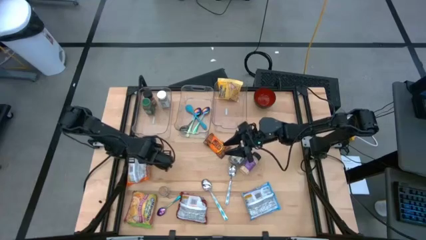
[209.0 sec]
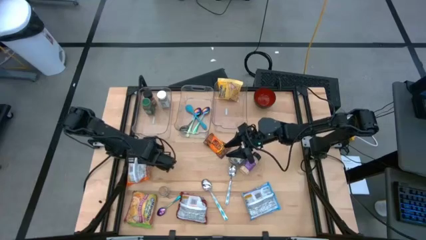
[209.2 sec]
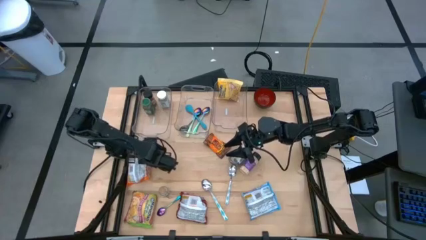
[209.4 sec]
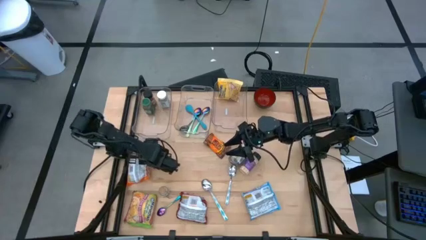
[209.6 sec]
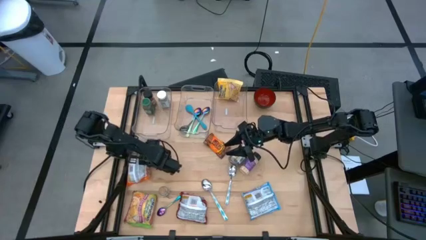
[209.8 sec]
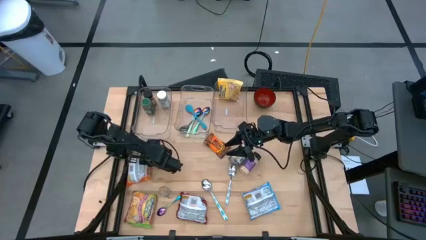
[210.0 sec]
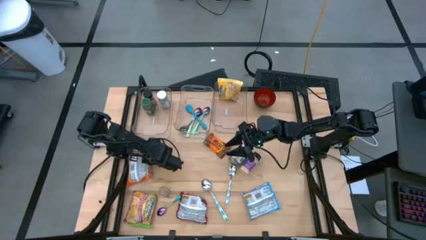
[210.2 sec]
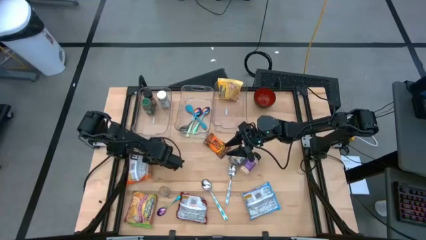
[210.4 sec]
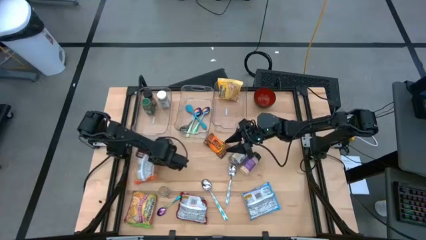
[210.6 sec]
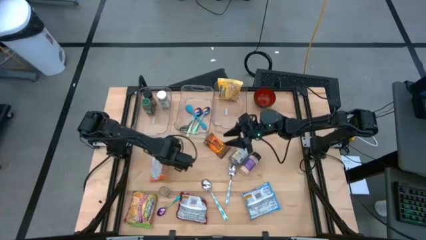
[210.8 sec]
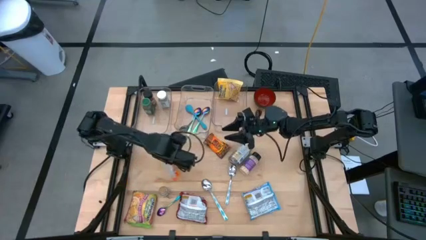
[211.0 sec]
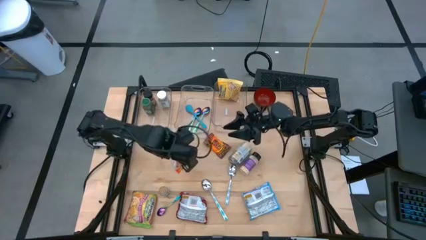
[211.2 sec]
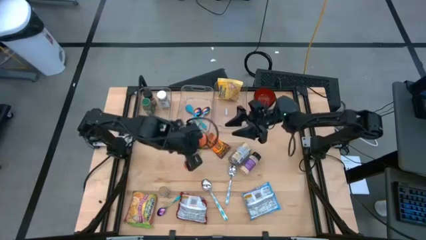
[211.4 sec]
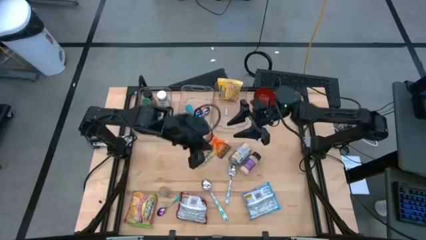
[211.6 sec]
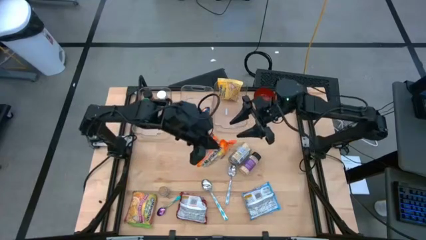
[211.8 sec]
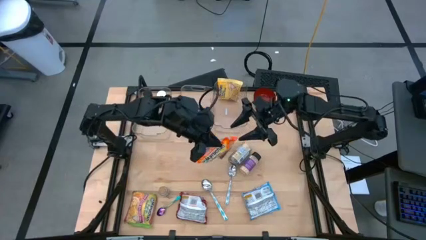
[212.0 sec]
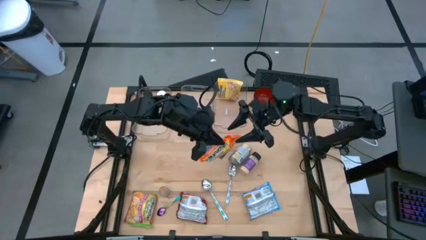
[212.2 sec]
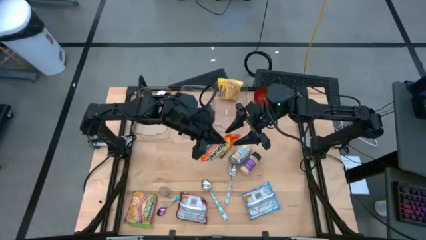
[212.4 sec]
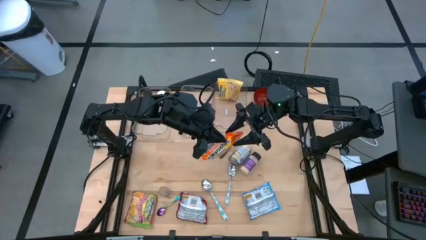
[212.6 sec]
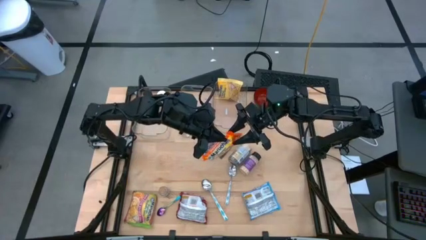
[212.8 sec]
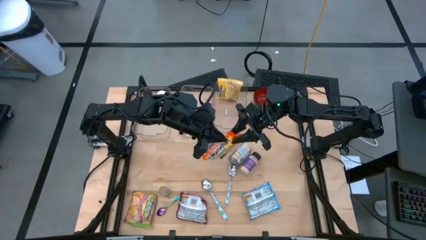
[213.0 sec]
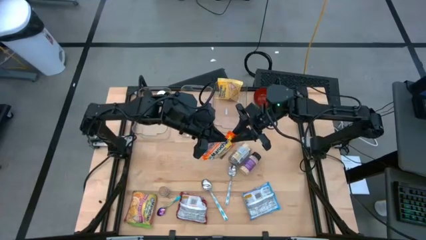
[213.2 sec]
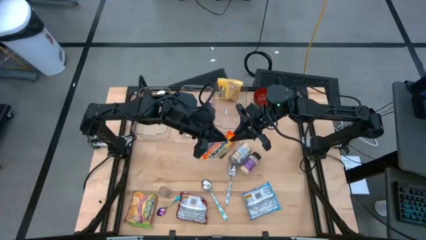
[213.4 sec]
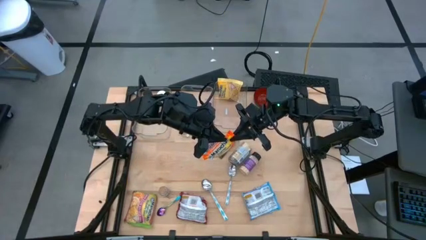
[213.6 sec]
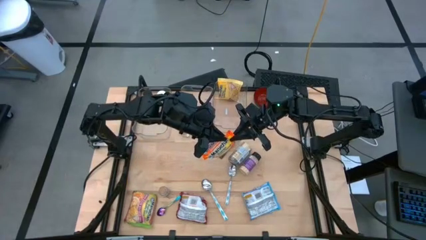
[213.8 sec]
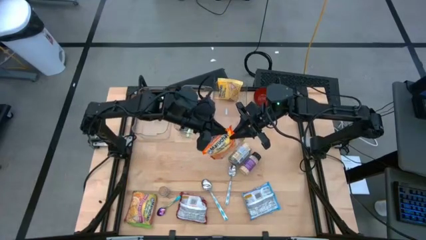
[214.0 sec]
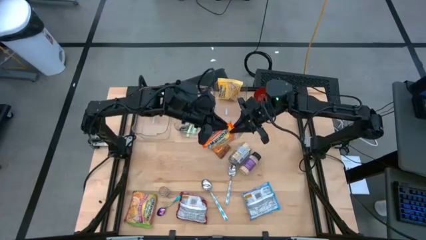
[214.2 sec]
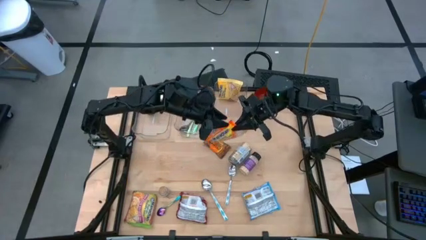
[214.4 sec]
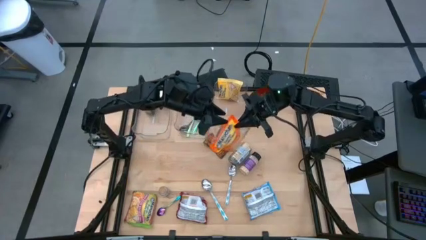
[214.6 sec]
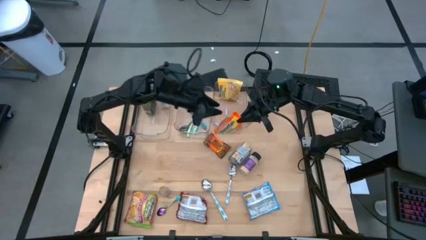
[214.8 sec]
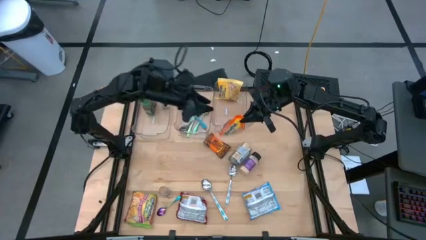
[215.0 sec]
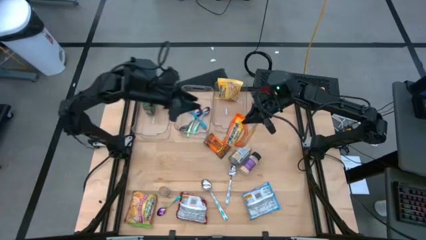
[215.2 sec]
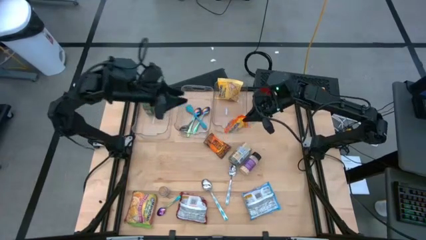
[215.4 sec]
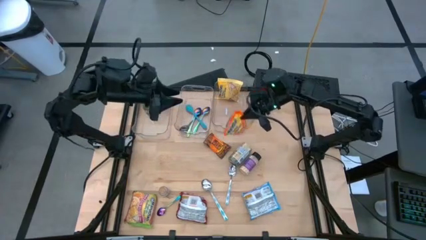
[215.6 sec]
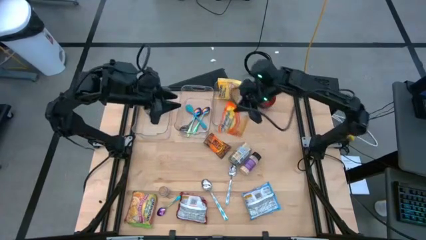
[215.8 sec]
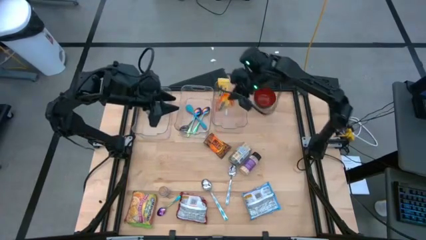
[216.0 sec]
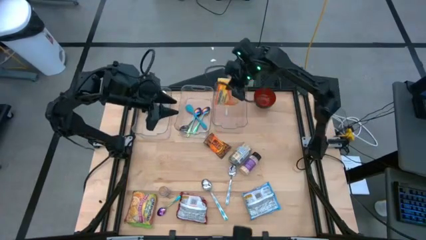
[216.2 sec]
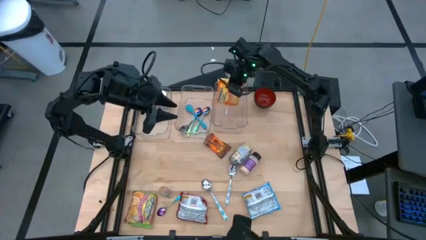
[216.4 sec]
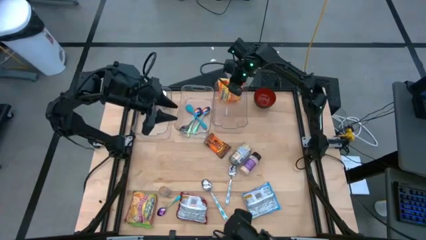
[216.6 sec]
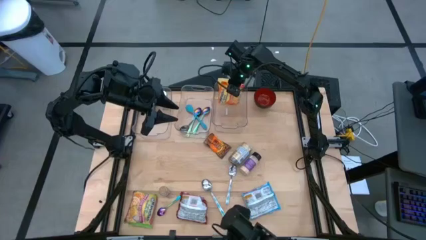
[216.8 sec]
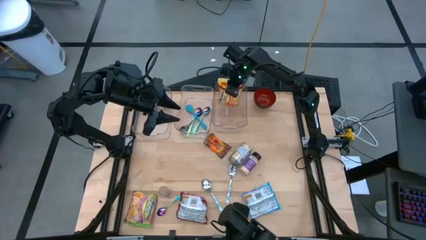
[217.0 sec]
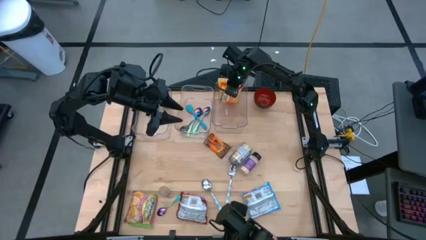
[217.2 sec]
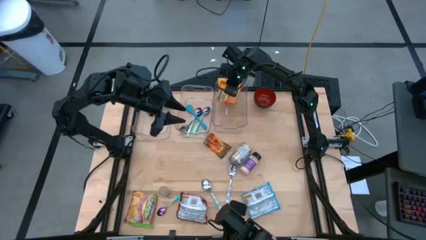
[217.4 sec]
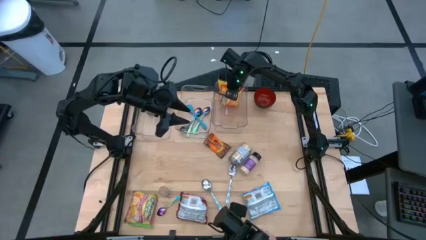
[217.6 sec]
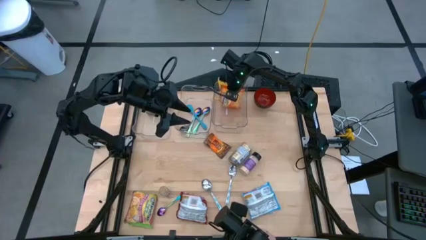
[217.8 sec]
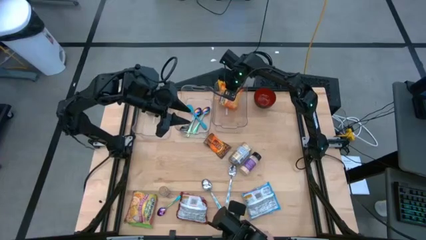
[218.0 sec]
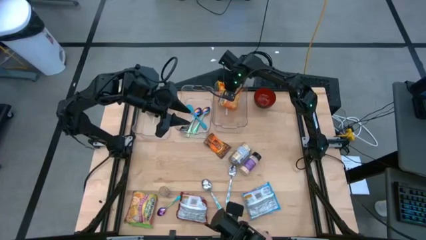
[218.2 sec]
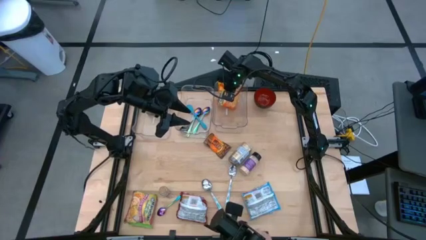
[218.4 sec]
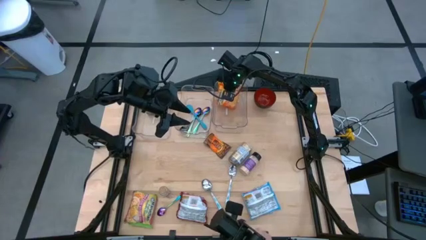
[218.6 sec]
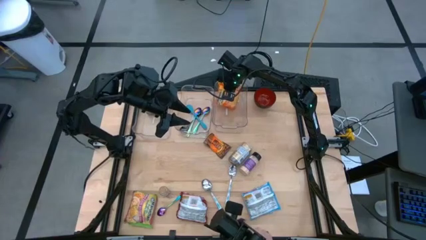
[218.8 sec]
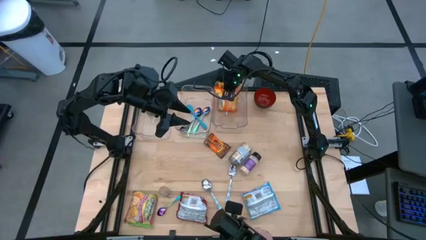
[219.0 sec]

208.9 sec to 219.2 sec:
Task: Pick & Place Food Item
Put the orange noodle pack into the right transparent bin

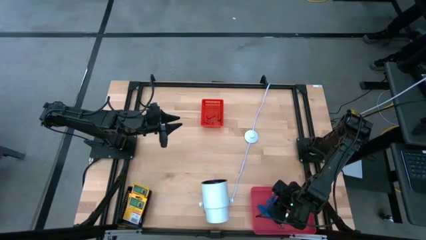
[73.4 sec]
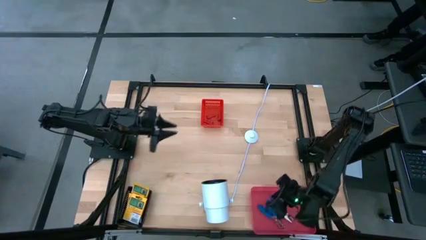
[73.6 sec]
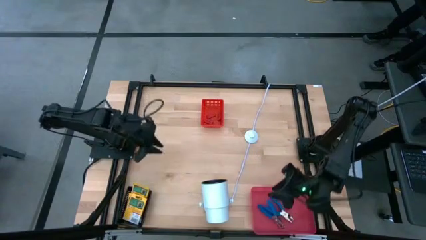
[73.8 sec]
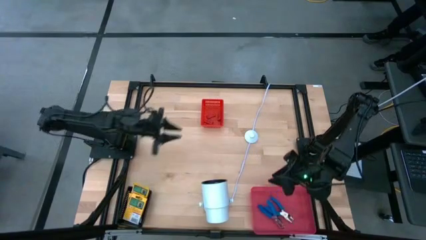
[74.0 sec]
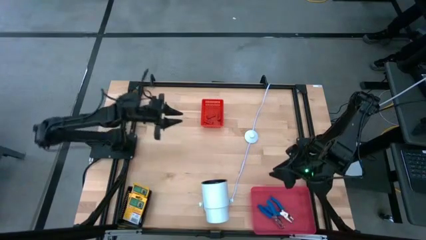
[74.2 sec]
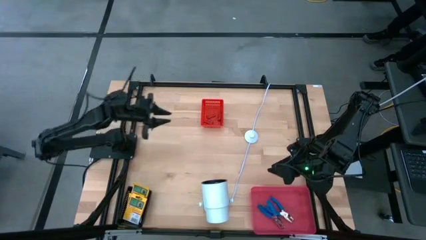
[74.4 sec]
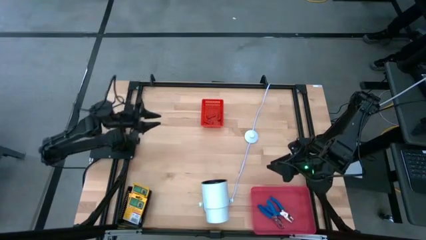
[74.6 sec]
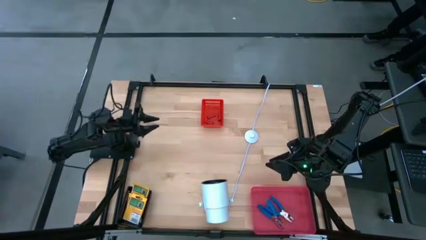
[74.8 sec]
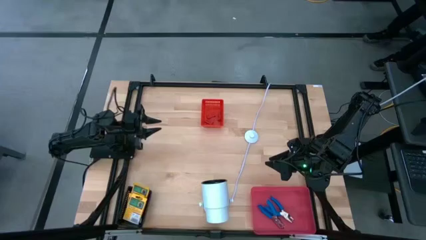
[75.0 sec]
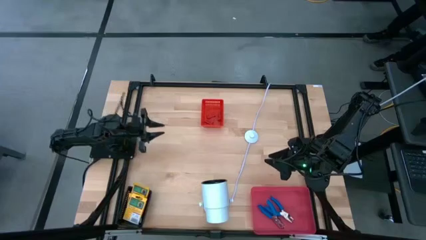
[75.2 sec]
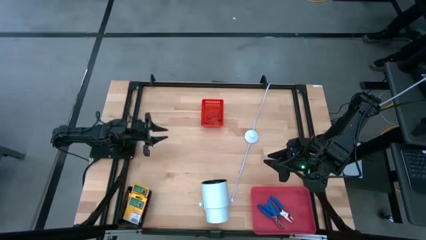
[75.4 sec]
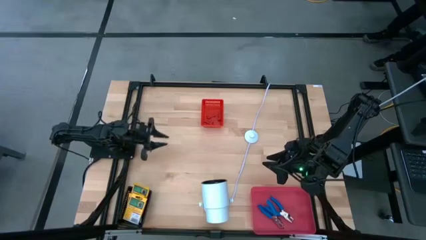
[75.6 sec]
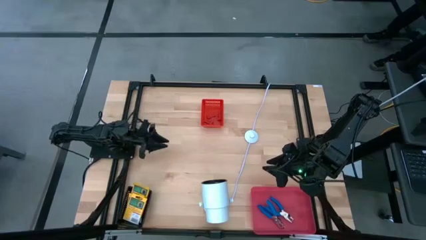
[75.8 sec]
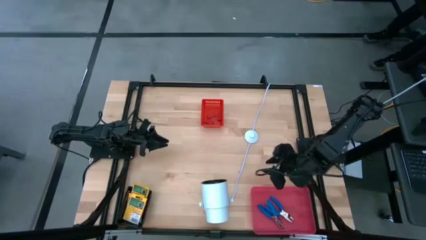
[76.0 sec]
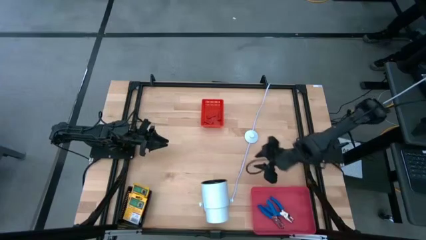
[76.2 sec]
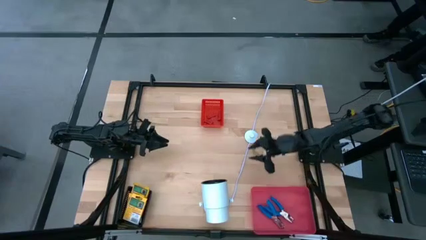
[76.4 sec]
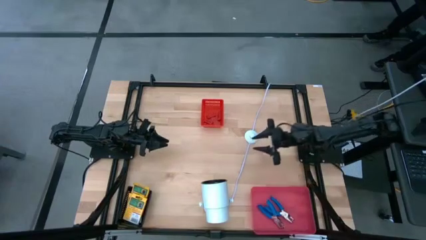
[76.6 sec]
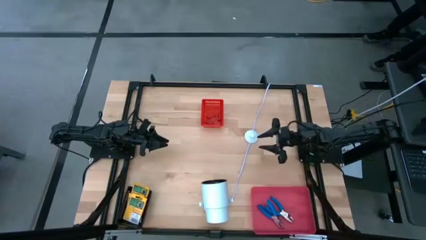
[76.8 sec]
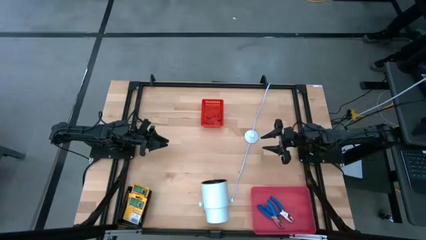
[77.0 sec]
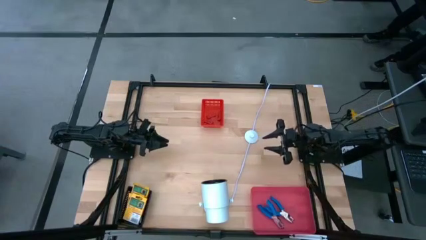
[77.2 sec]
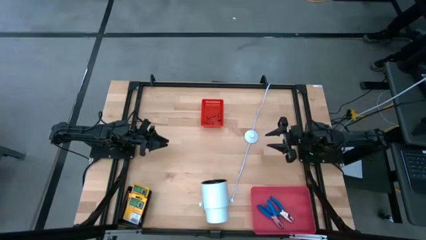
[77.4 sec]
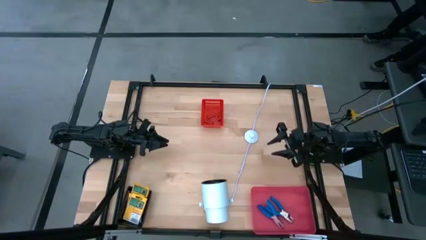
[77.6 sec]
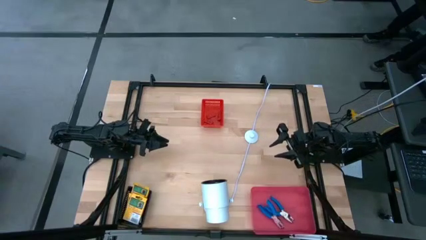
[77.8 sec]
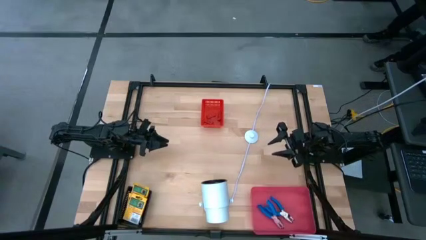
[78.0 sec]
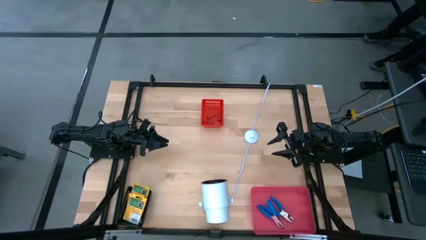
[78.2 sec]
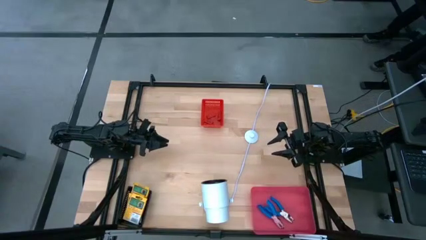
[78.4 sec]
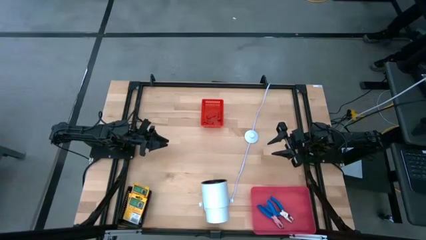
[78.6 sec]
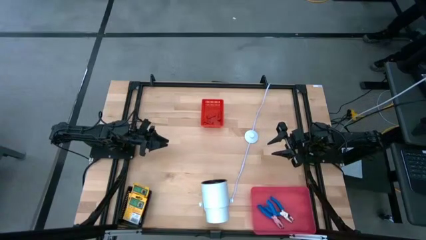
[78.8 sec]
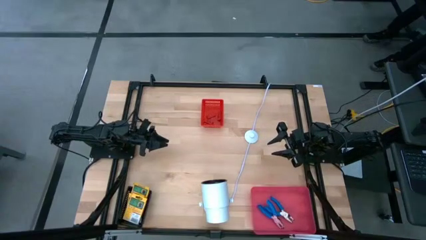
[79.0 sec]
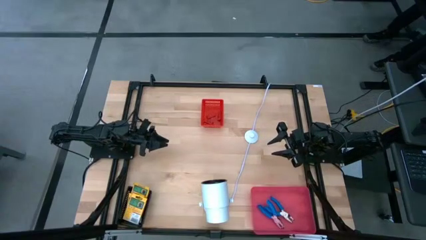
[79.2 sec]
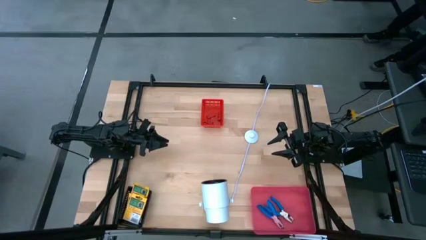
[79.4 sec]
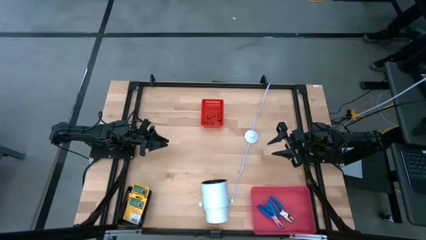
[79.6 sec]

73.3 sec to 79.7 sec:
Task: Pick & Place School Supplies
Return to Home Position
